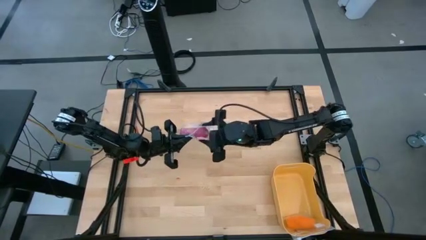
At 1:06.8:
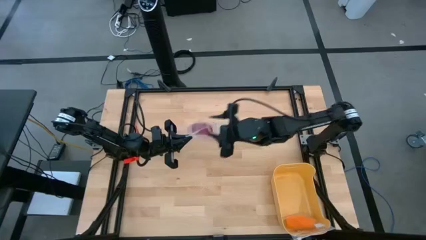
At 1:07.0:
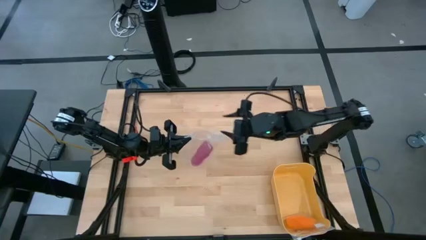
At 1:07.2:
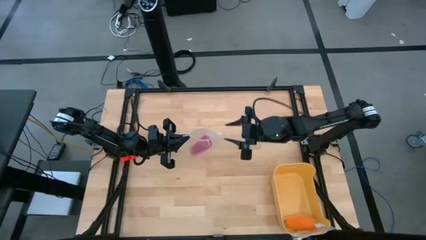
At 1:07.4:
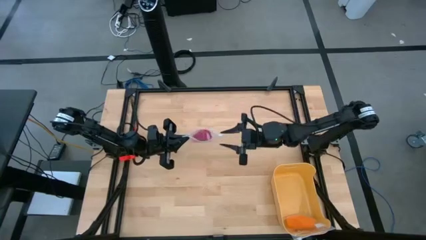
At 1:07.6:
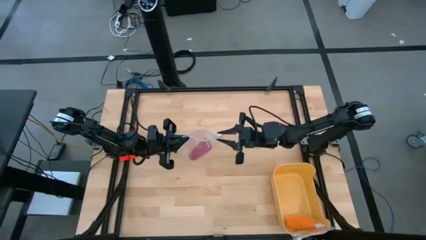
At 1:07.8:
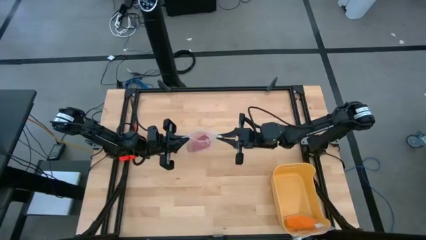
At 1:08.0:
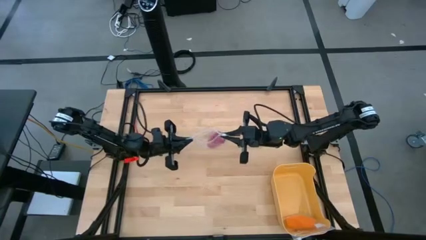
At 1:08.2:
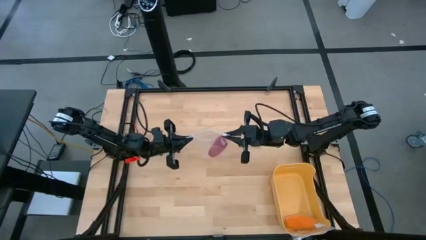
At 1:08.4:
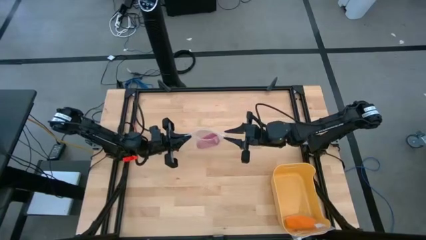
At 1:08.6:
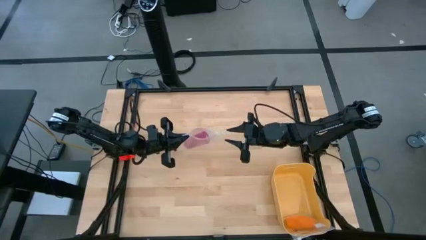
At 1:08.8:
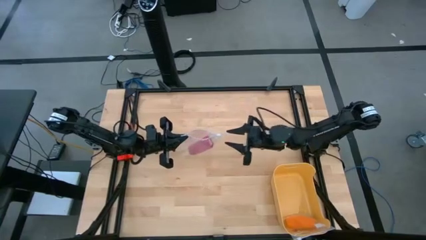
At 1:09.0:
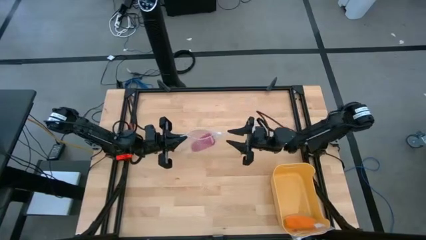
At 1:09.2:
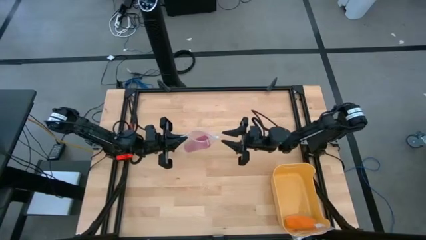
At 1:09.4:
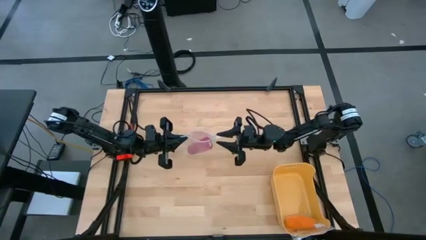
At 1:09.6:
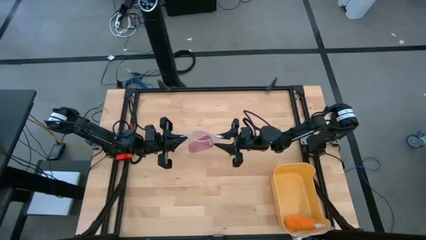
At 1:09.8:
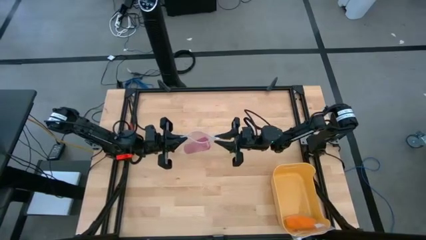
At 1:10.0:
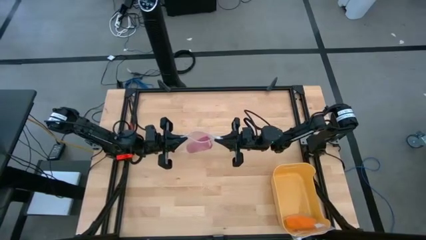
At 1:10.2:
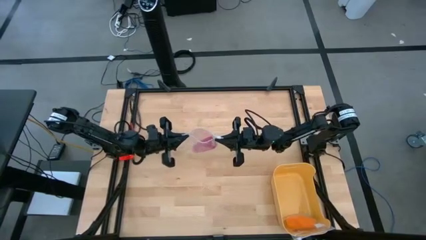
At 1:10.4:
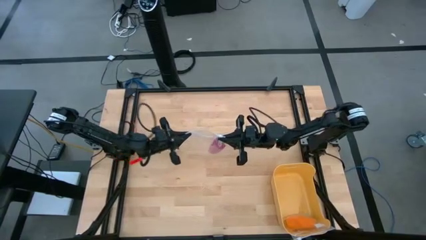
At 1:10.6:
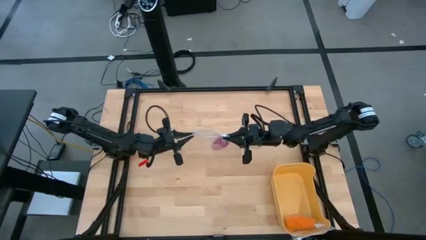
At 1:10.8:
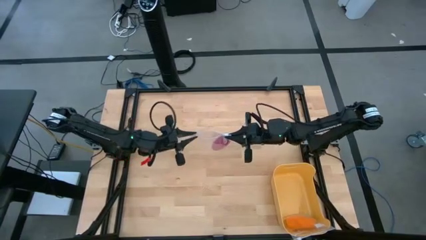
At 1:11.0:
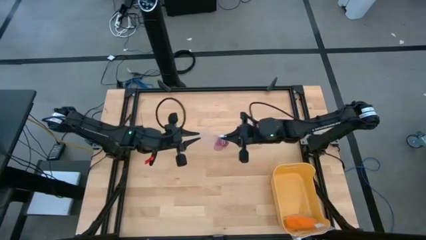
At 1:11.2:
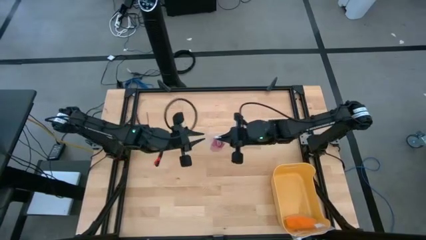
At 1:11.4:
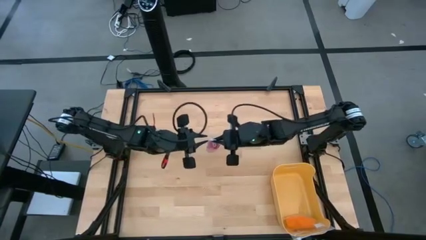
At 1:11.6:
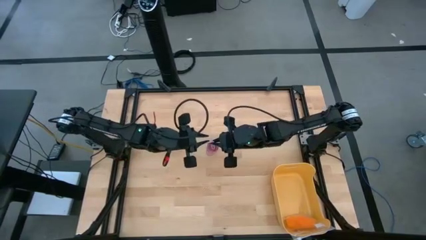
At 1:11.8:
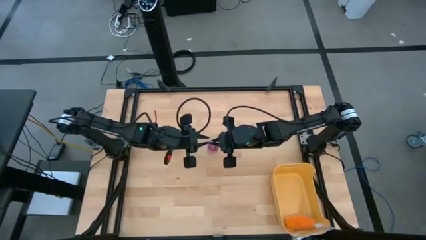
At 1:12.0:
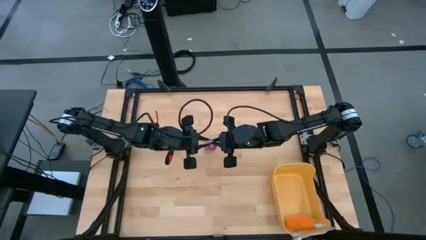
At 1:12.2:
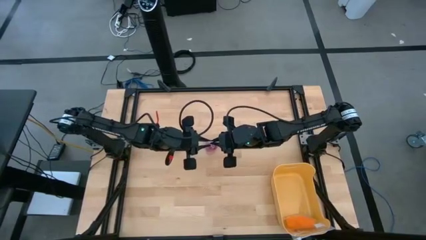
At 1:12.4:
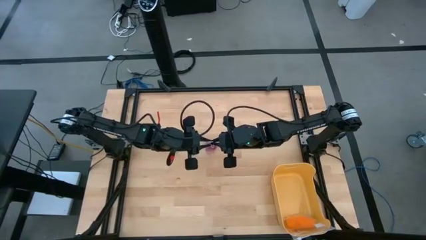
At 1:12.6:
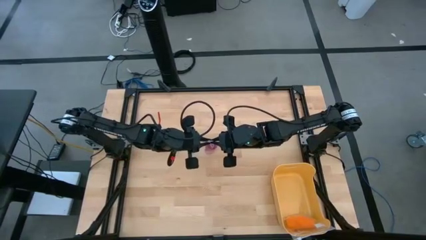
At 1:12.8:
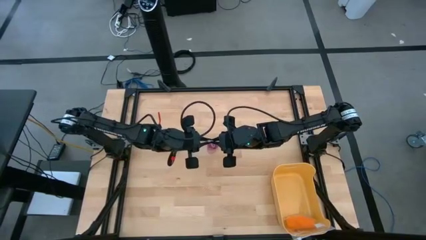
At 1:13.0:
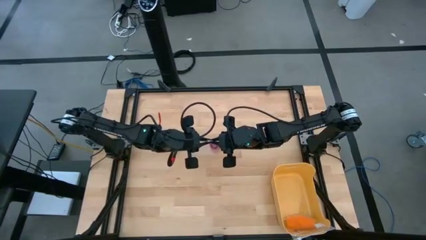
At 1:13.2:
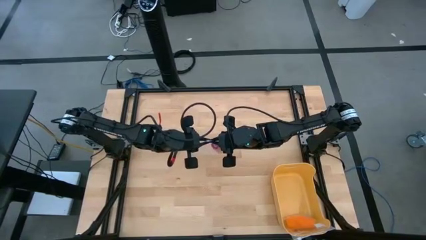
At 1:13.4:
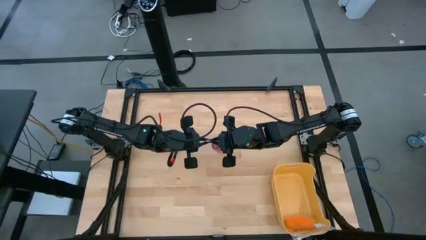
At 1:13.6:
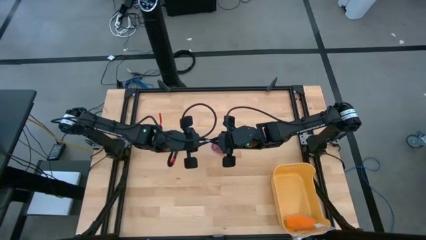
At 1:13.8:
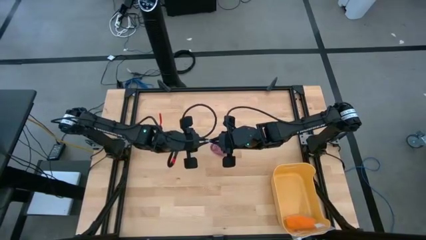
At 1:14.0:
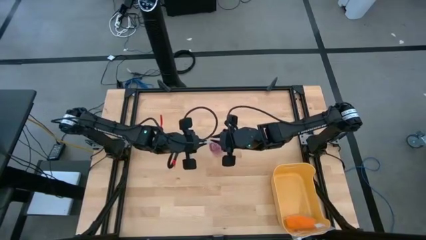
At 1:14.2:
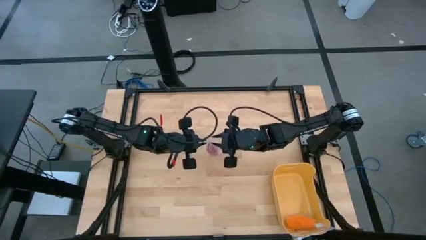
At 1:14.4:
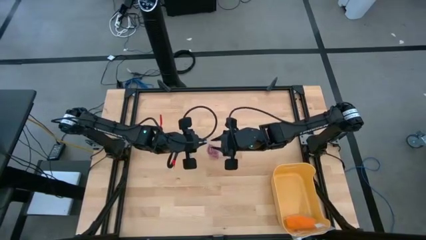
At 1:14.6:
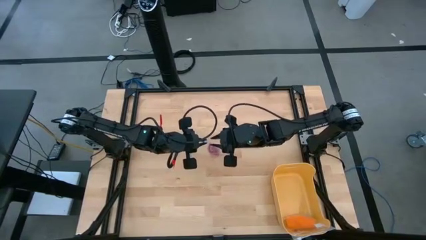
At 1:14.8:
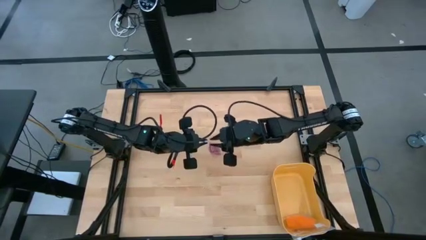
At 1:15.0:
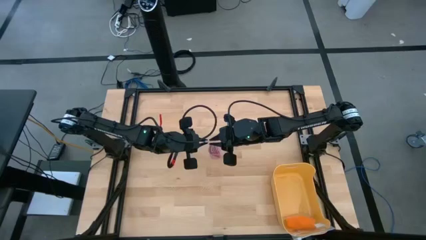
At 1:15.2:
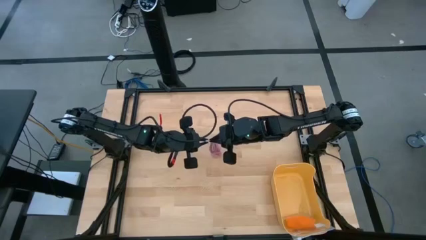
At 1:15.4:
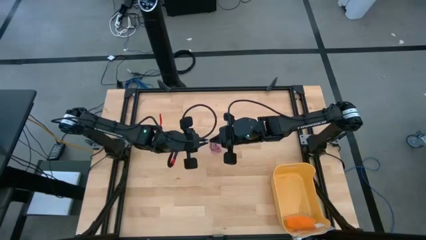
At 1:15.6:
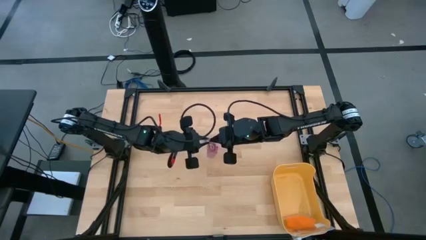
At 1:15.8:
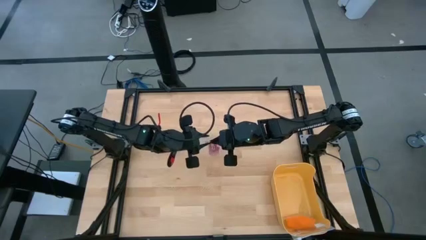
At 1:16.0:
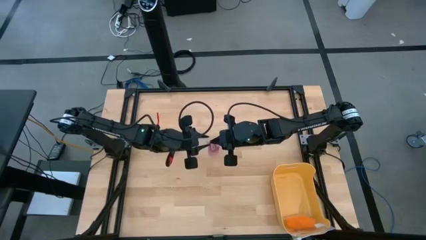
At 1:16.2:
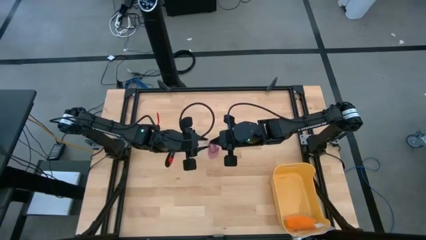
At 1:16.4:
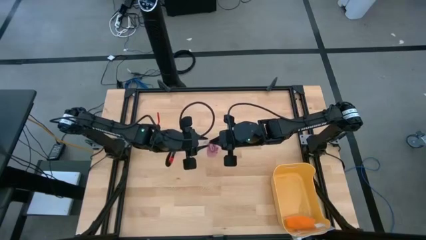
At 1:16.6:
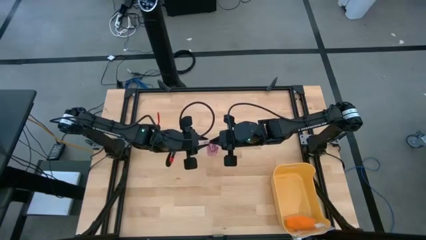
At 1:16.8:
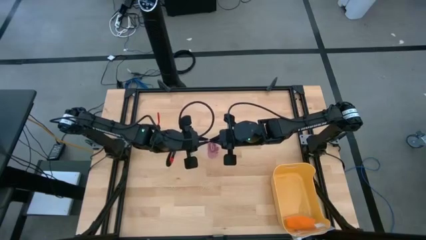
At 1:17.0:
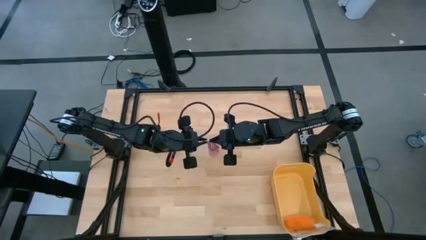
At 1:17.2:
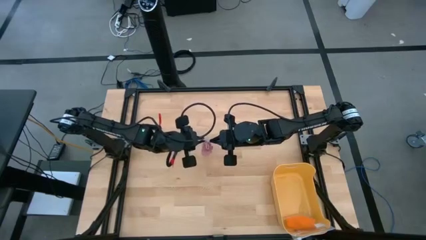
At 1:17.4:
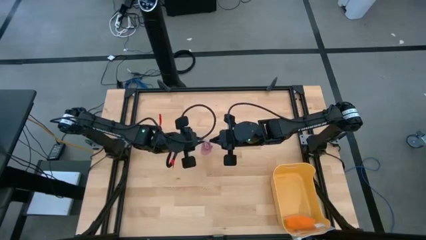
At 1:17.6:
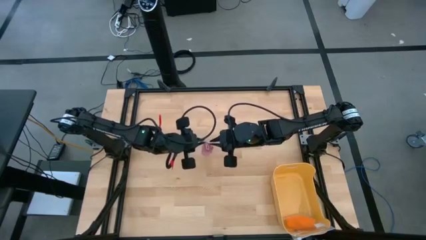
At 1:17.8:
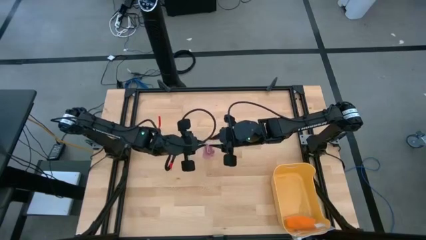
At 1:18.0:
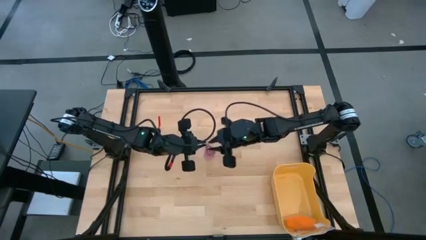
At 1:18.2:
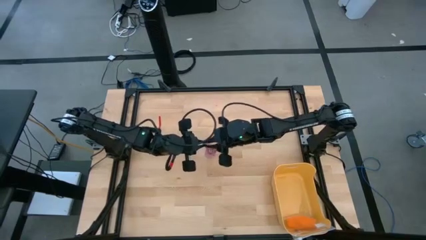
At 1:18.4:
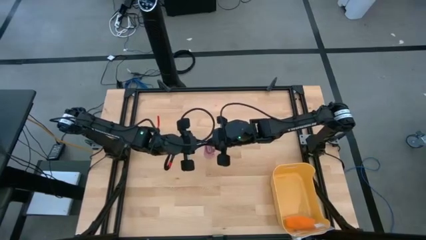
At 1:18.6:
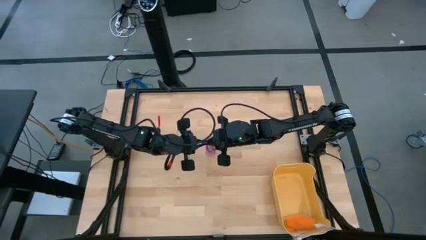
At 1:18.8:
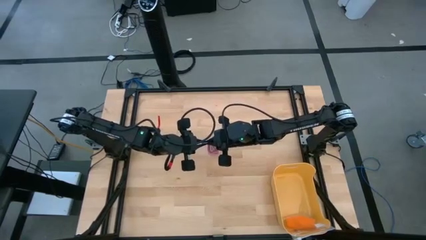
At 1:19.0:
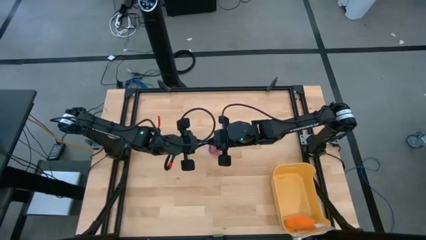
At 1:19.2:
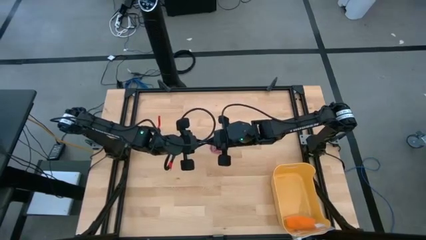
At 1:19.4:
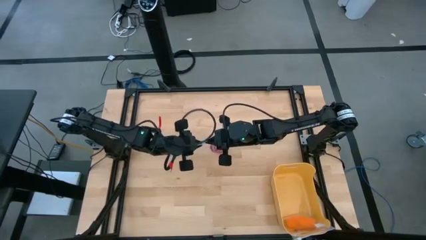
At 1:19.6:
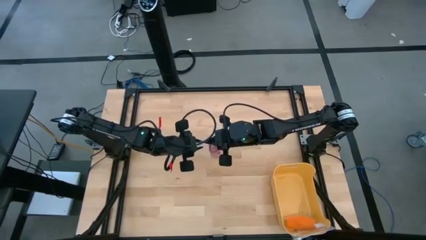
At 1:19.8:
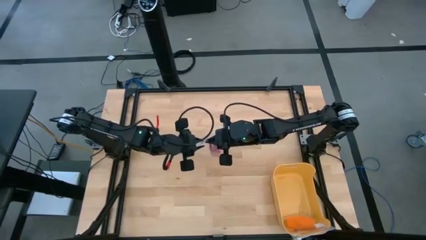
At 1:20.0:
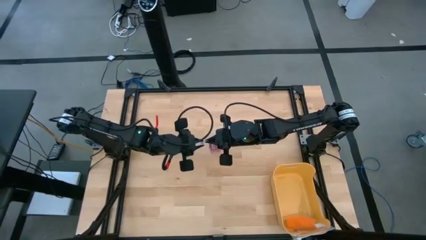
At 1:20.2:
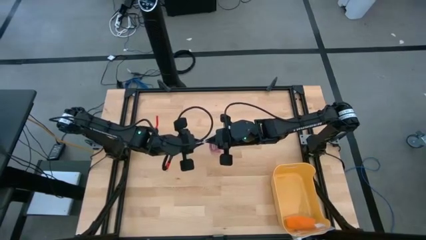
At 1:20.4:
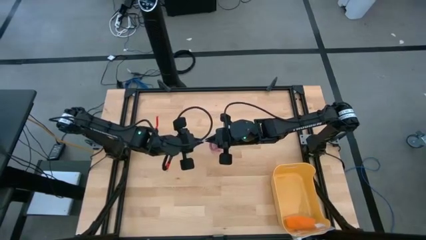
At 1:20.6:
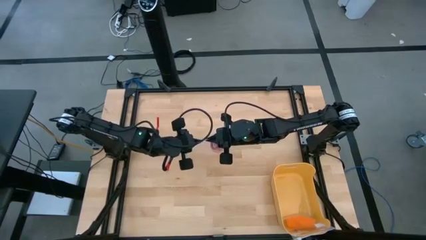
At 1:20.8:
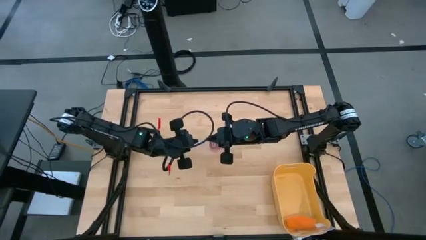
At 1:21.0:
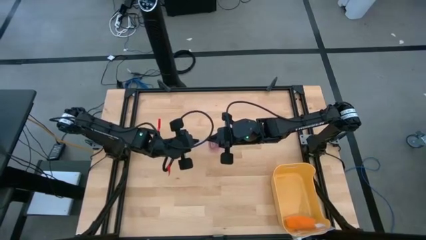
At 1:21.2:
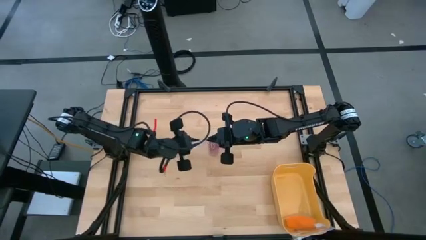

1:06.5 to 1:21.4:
Task: Roll bandage
Close the transparent zip bag
